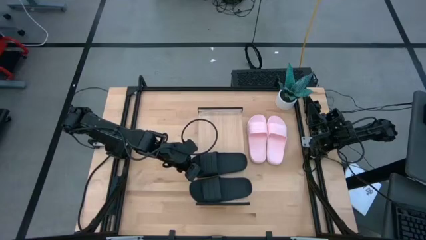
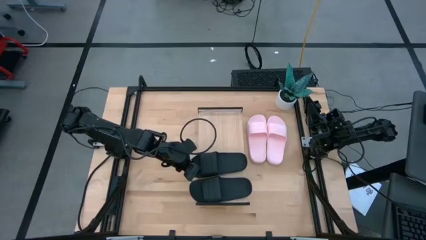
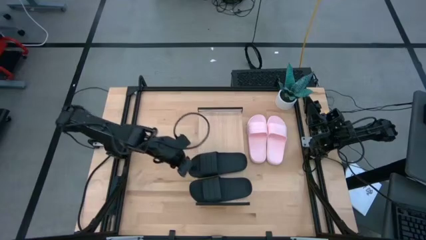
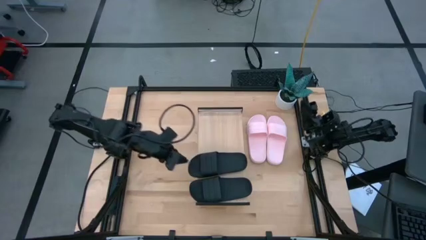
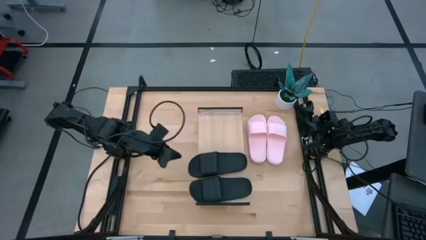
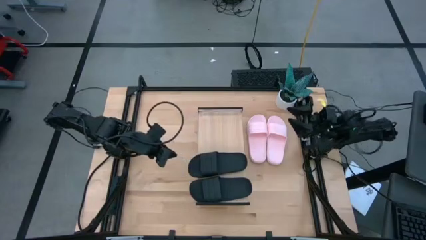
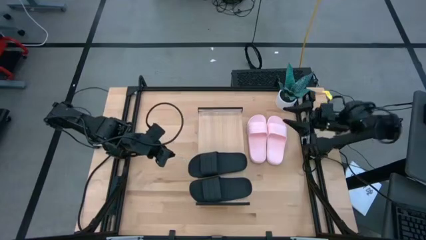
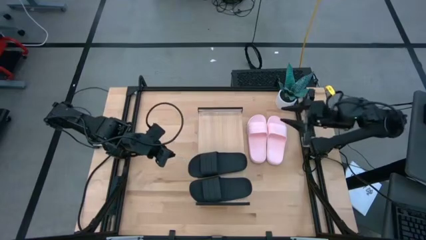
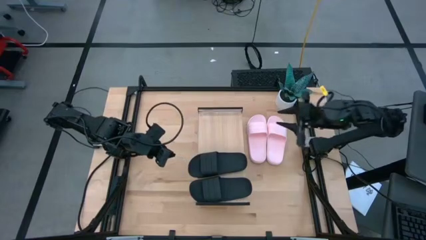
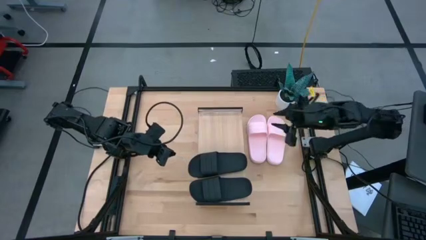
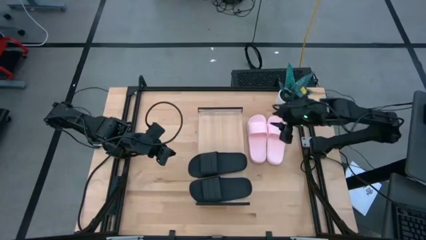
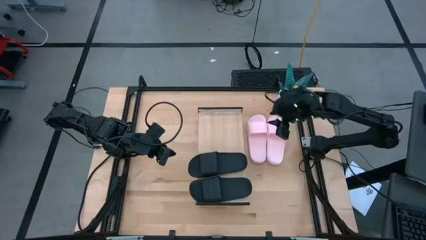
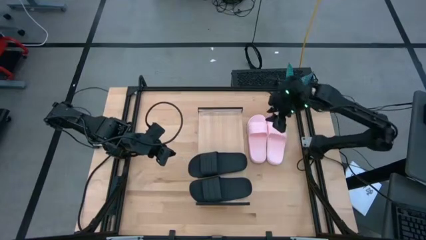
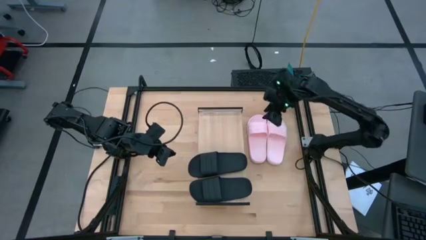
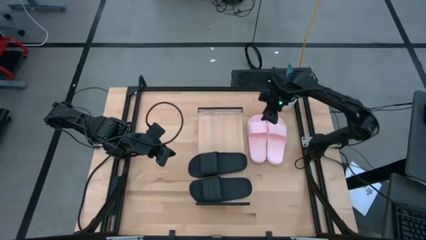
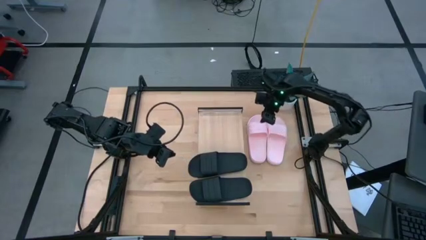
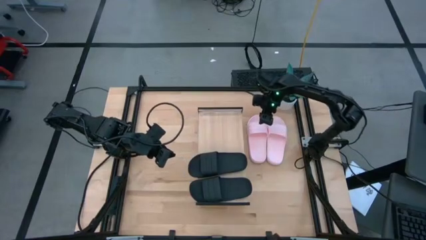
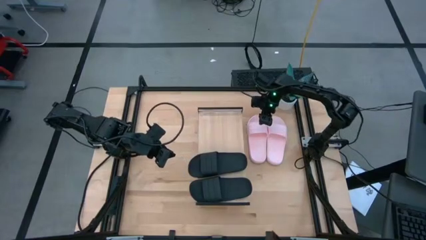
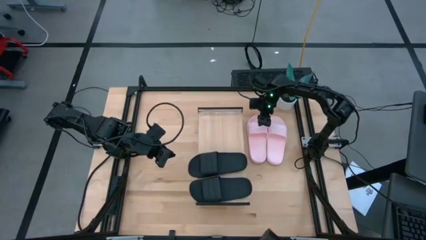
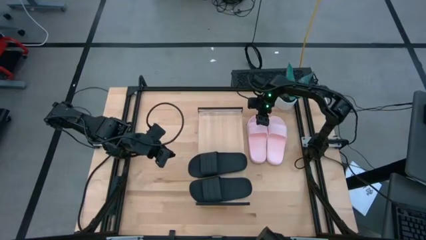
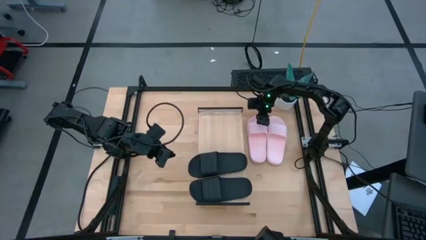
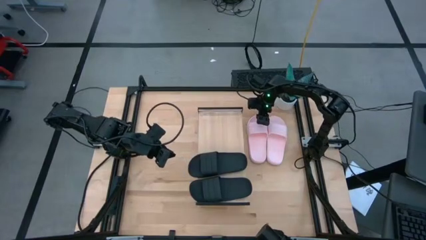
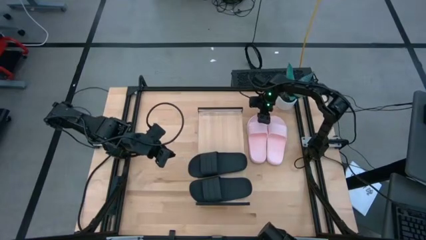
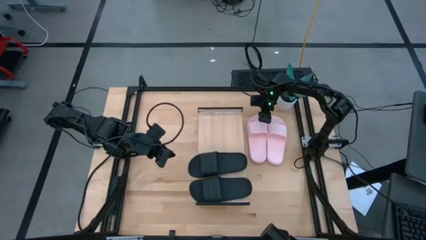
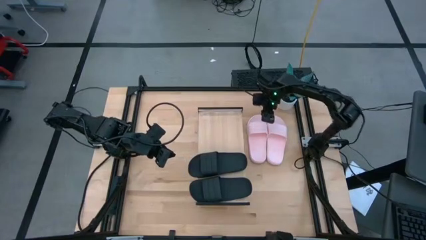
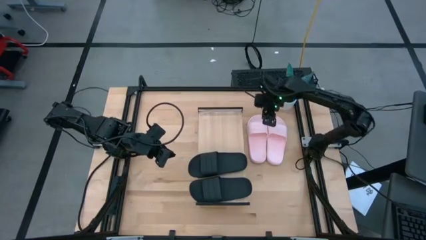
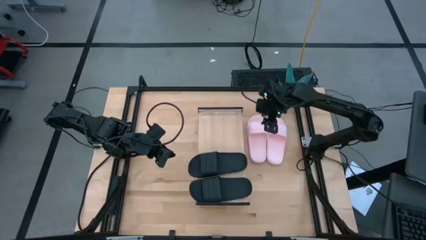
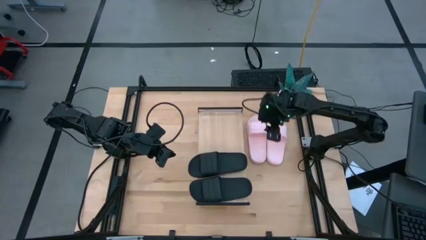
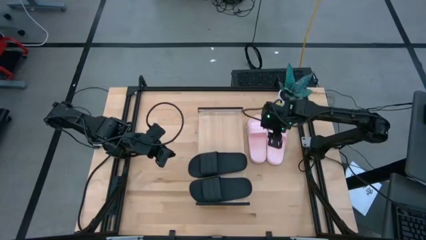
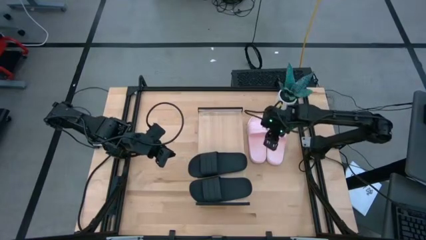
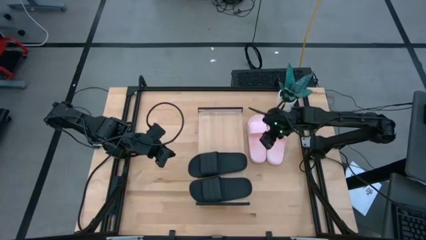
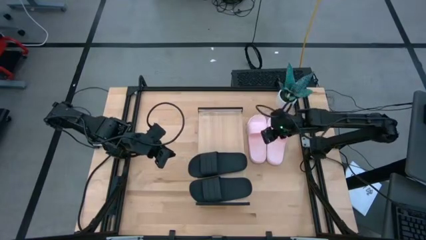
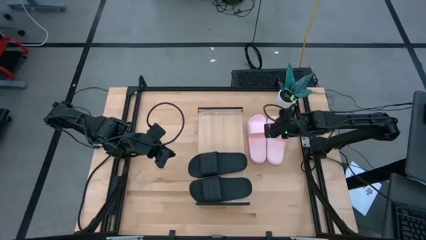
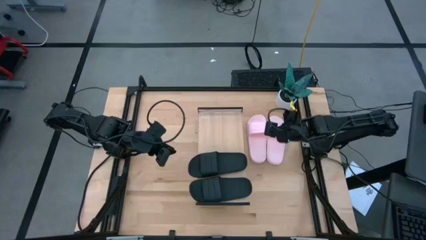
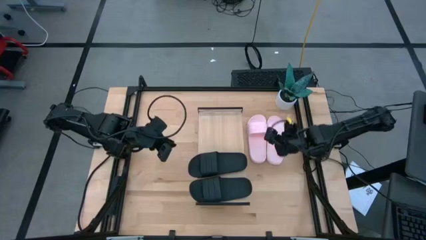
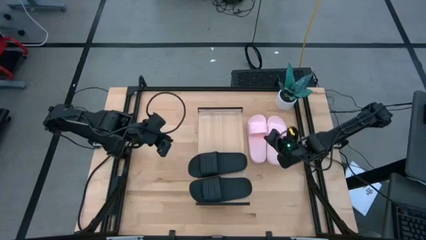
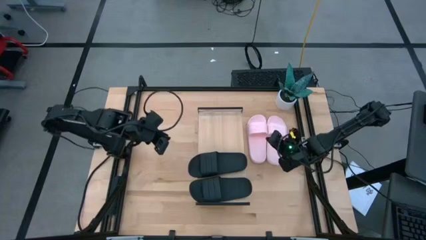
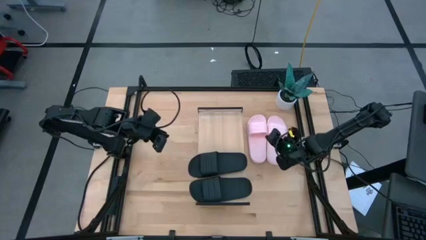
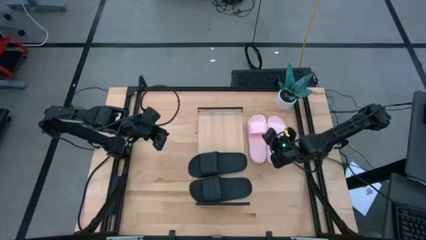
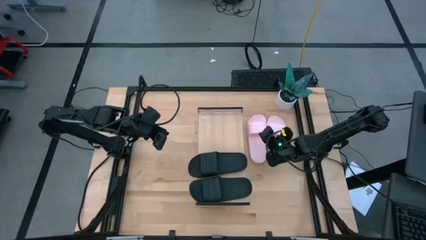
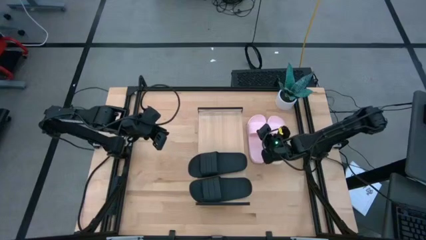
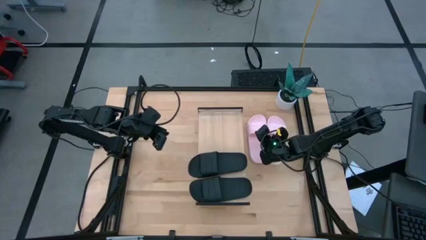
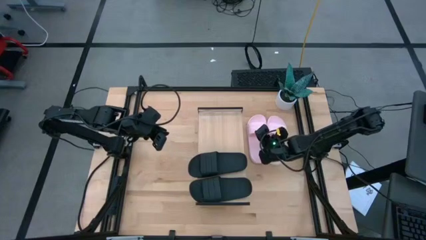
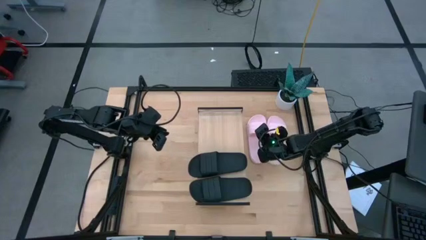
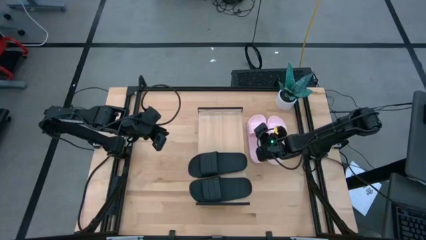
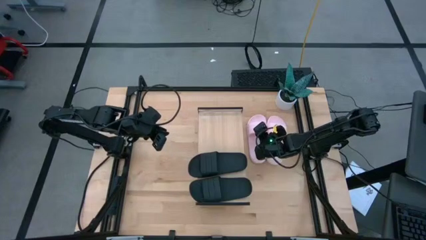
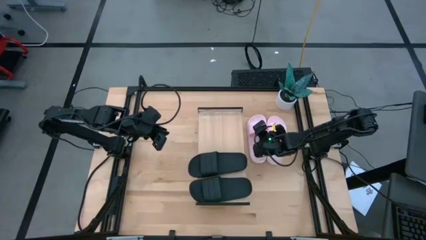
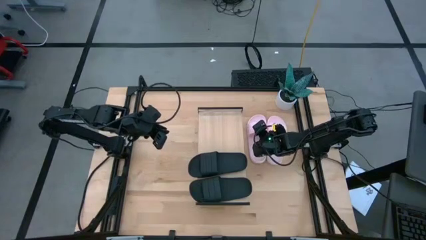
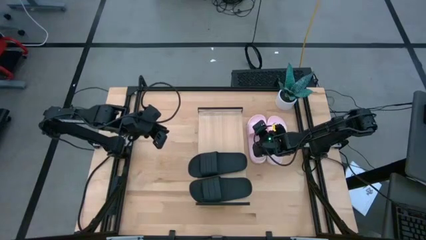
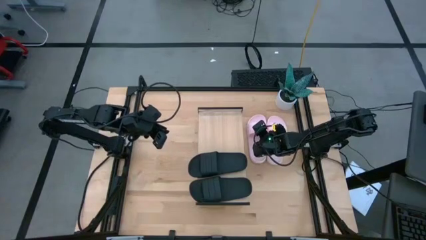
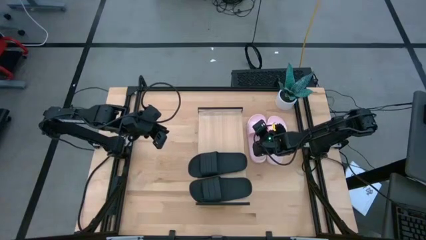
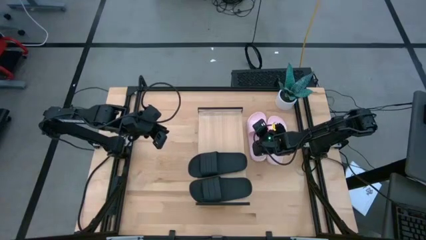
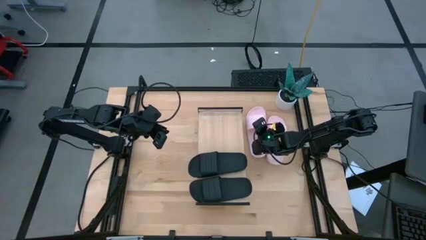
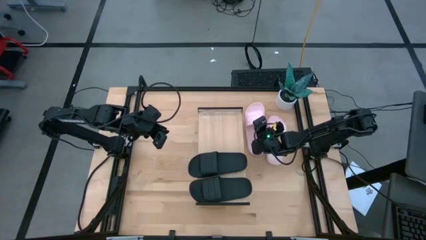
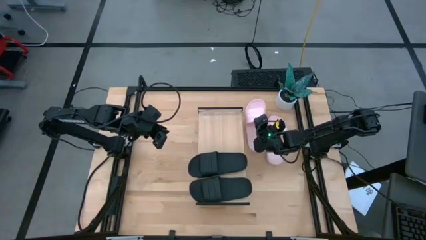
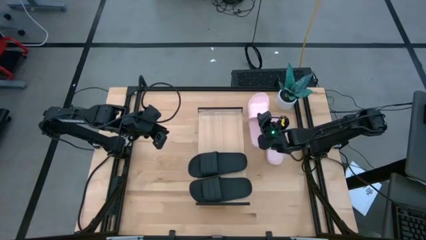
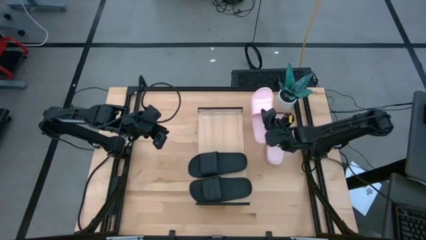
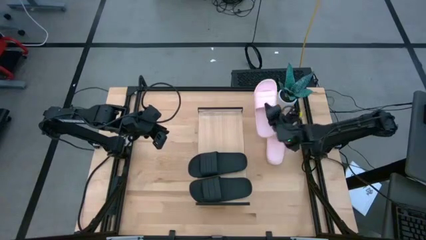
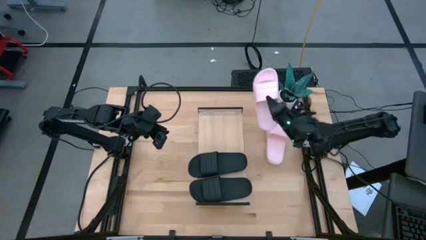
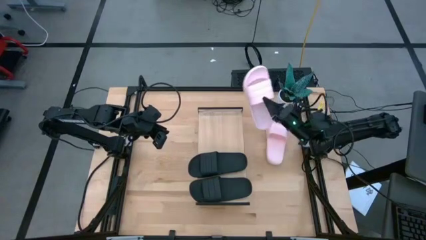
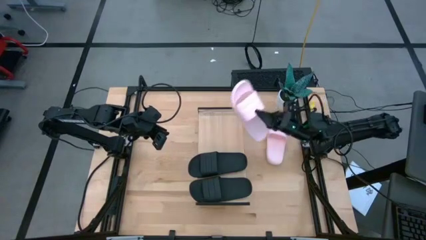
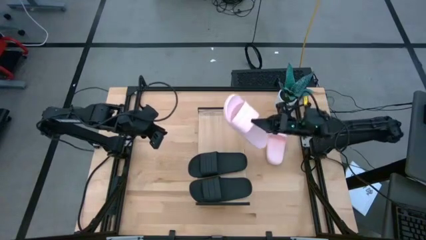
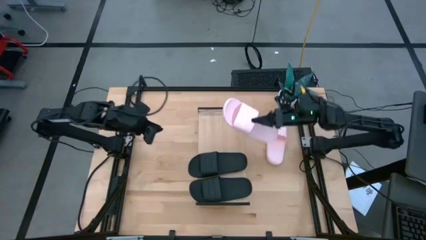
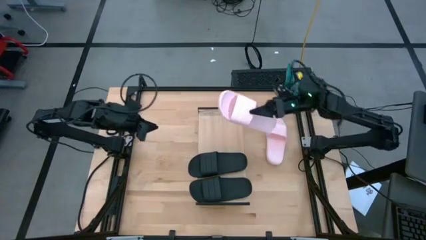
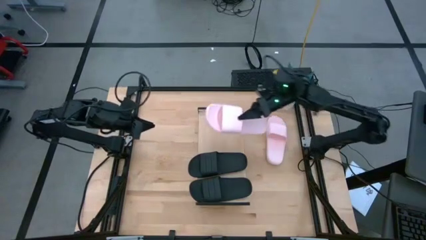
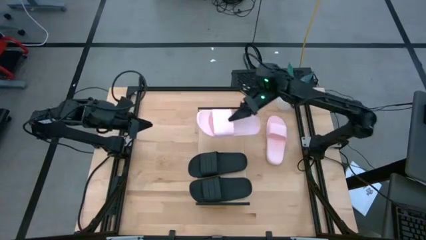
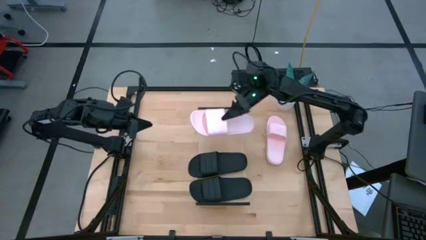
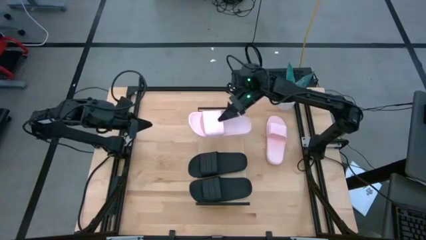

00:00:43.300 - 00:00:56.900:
Task: Pick and place slides into the shelf
Put the left pink slides on the shelf

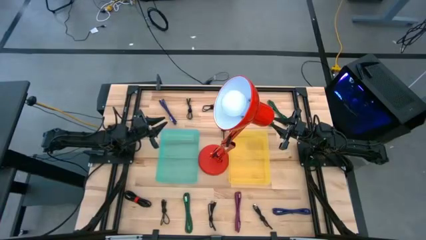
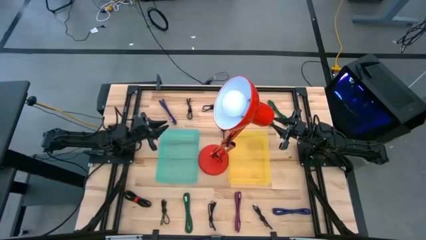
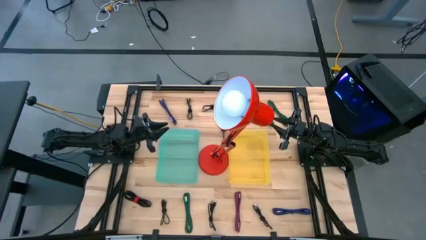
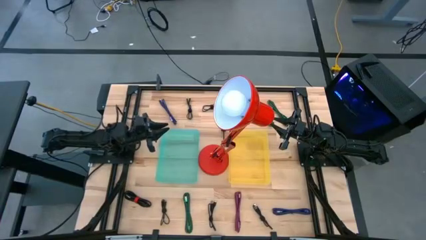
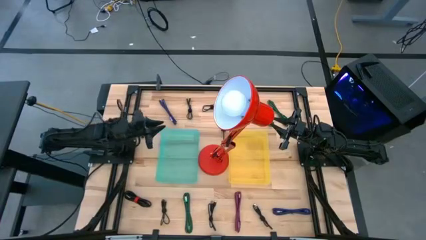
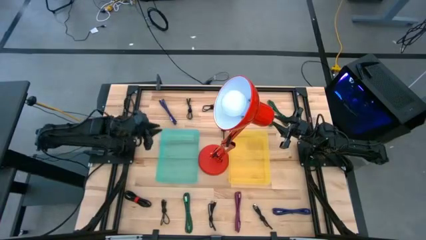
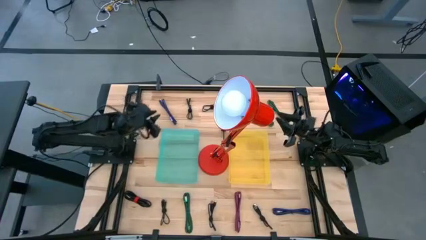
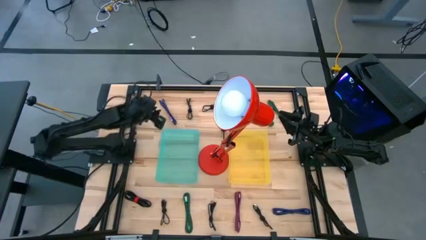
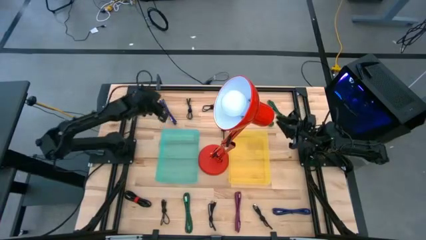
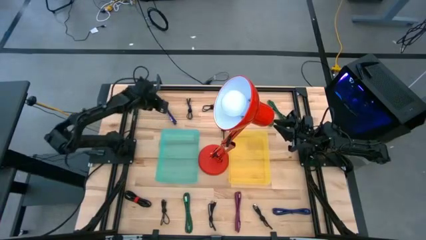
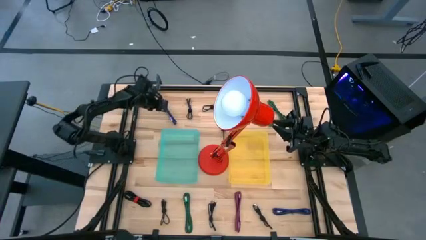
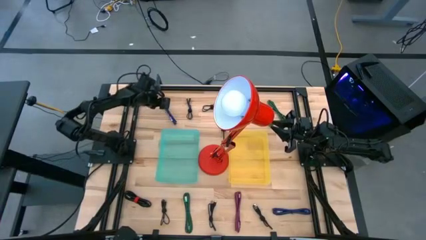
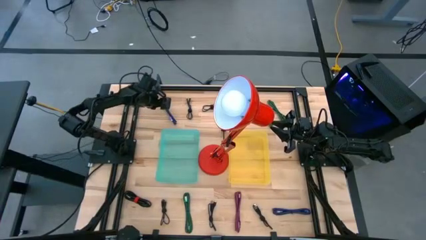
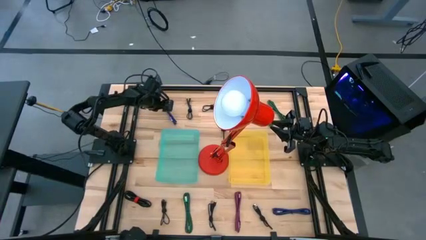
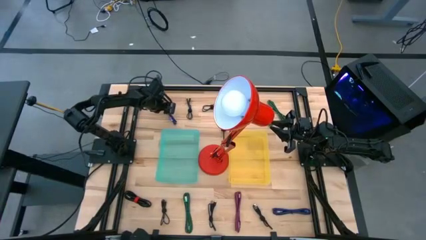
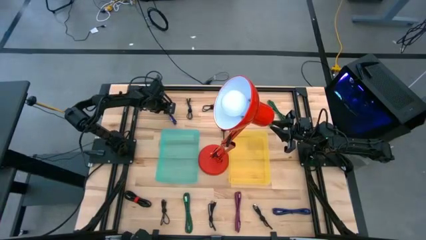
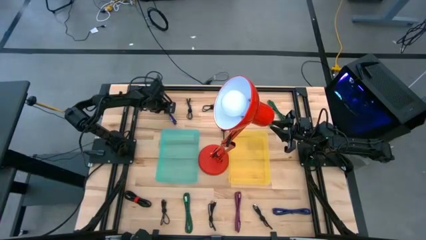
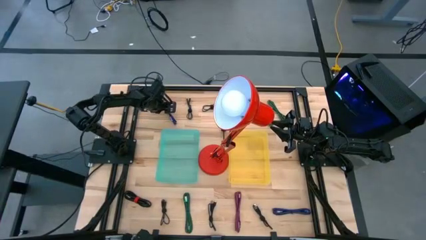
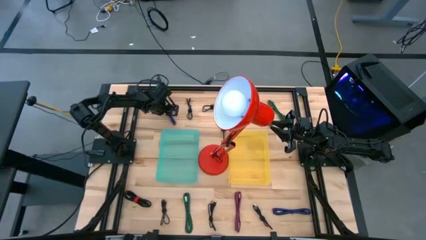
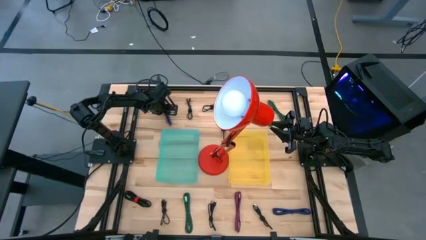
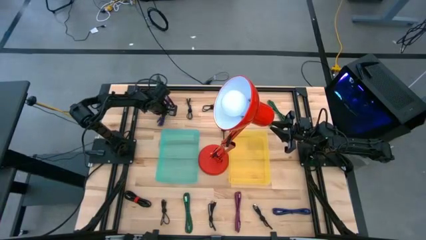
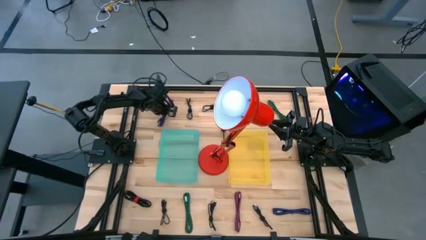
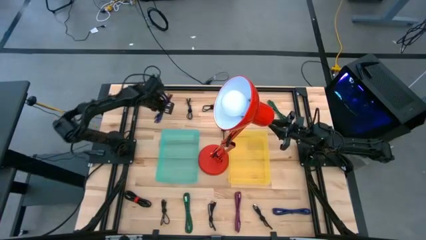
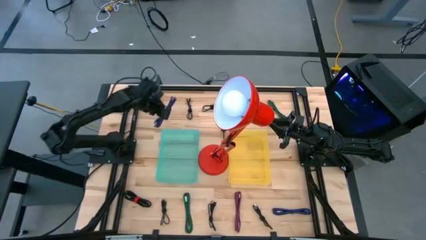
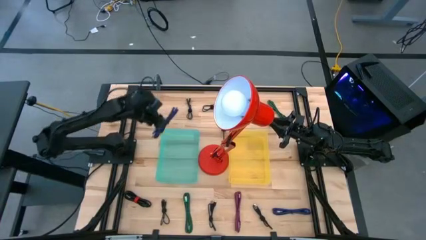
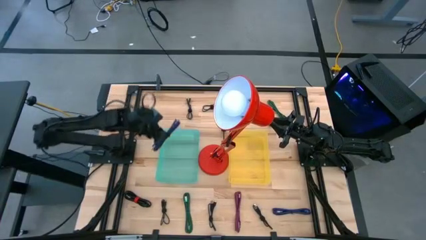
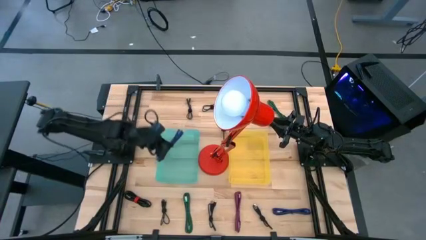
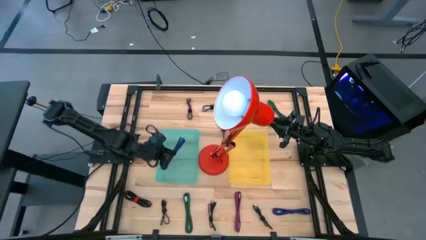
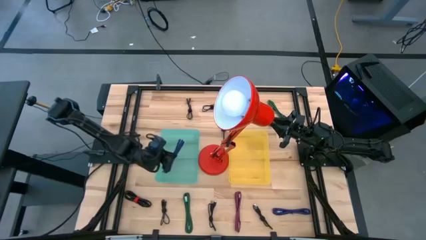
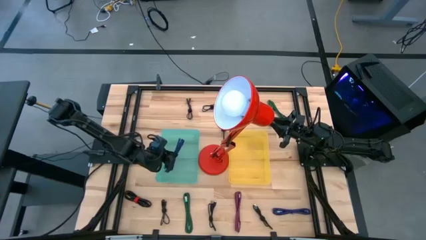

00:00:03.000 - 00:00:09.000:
Task: Pick & Place USB Port
Put the top blue patterned charger cable into the blue bin
